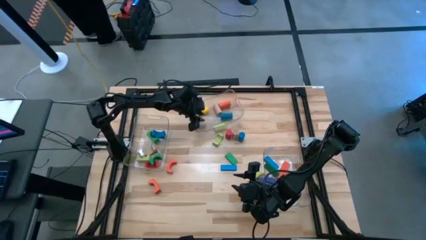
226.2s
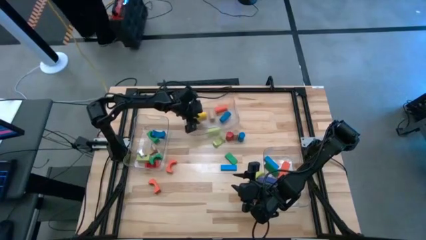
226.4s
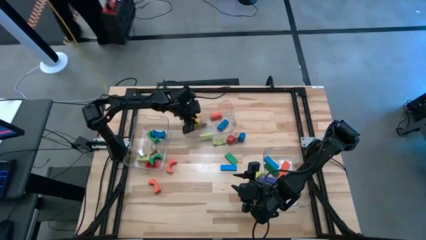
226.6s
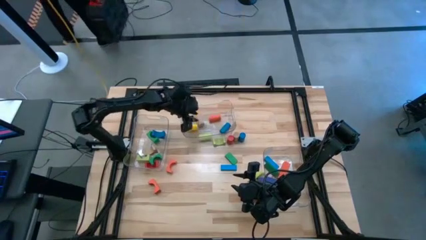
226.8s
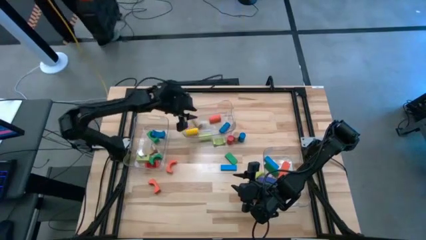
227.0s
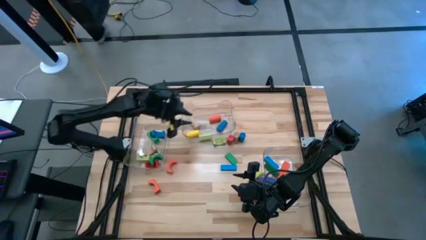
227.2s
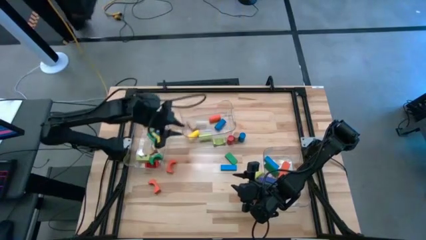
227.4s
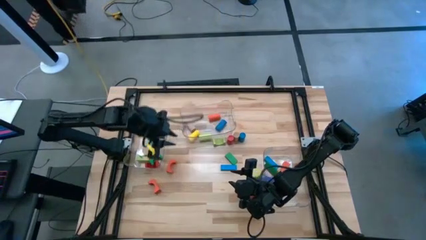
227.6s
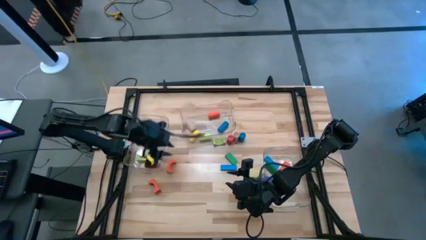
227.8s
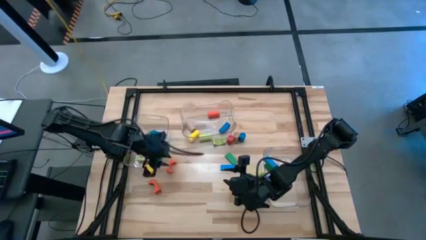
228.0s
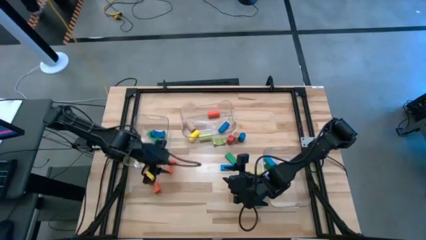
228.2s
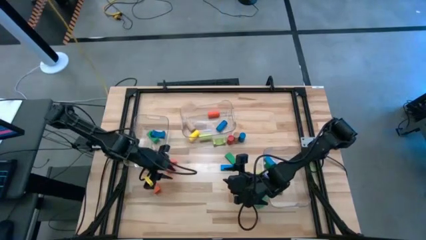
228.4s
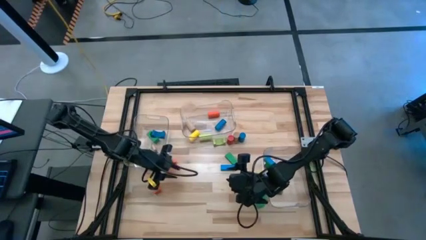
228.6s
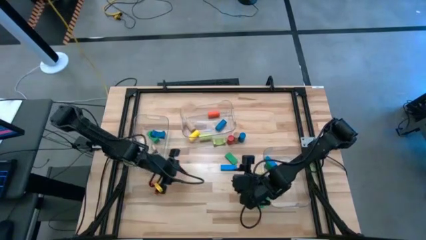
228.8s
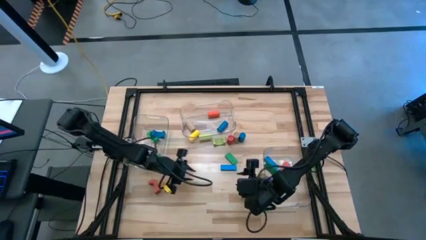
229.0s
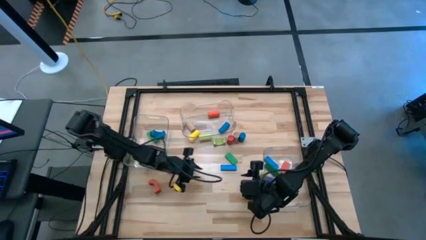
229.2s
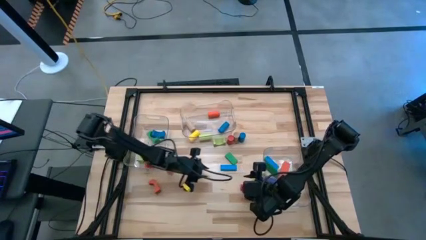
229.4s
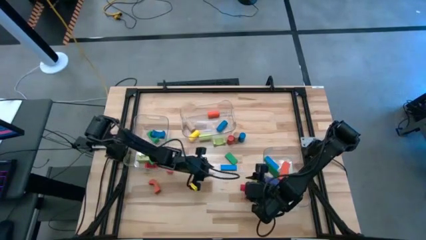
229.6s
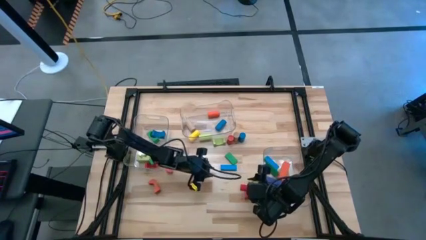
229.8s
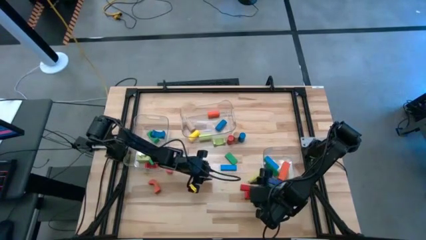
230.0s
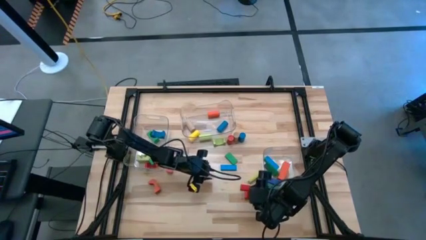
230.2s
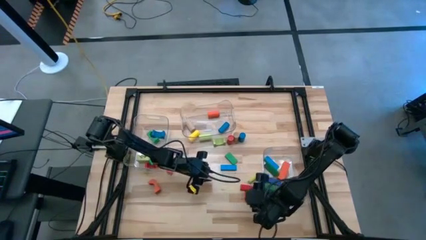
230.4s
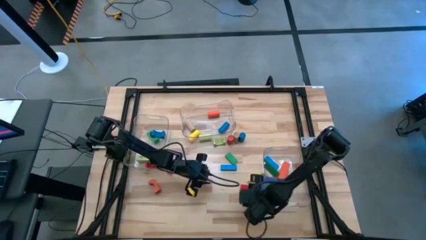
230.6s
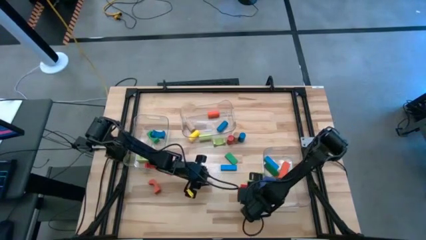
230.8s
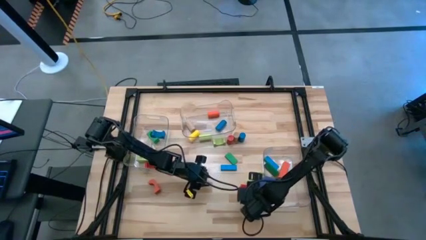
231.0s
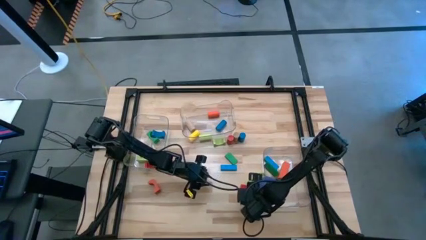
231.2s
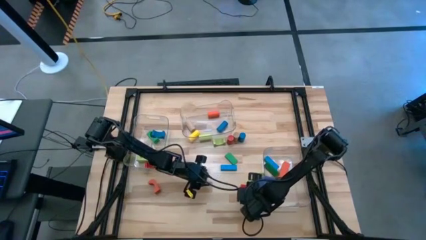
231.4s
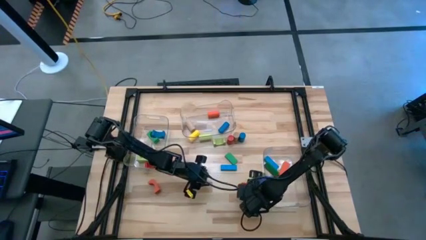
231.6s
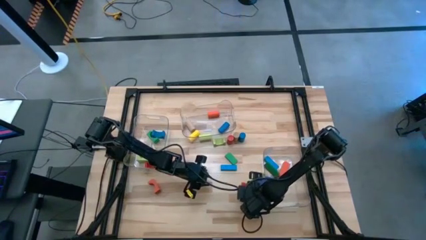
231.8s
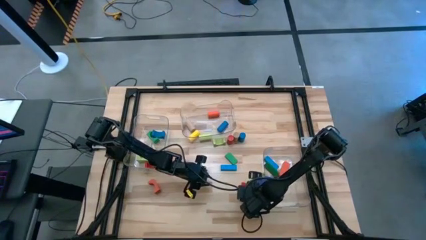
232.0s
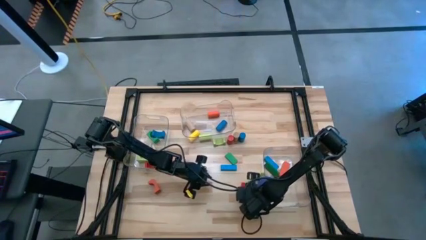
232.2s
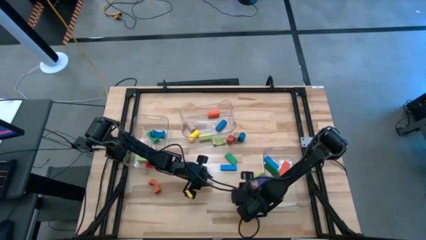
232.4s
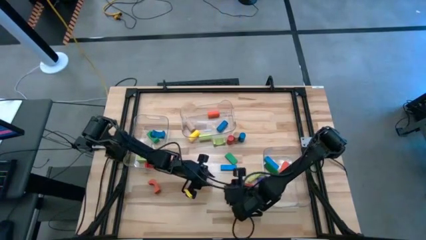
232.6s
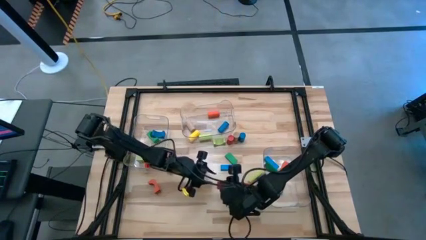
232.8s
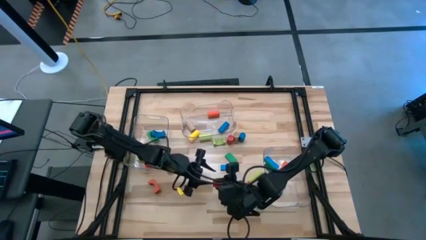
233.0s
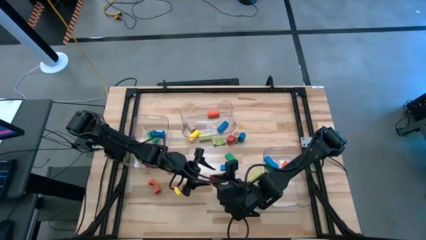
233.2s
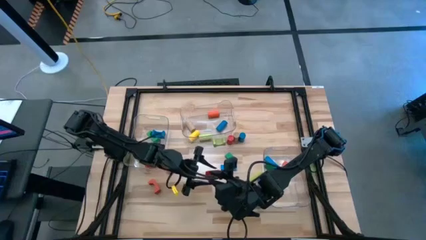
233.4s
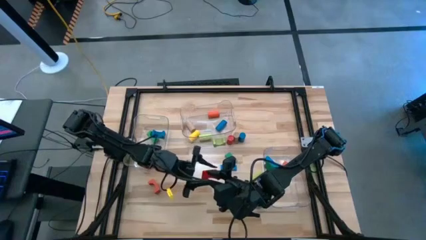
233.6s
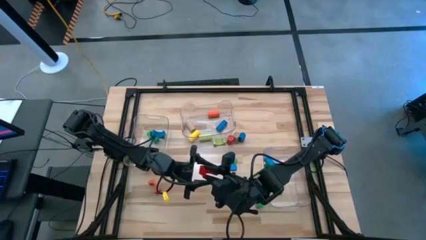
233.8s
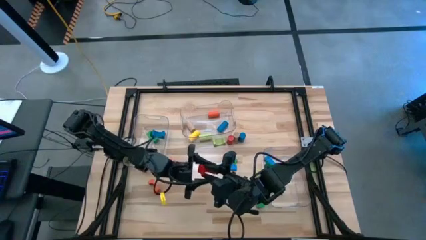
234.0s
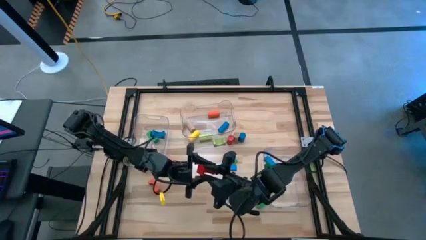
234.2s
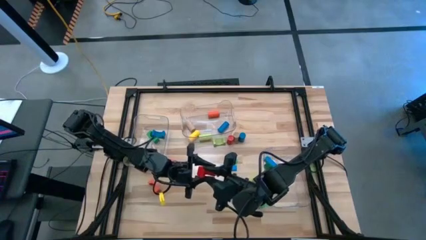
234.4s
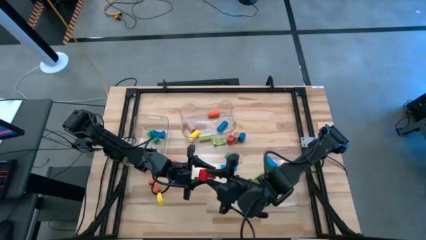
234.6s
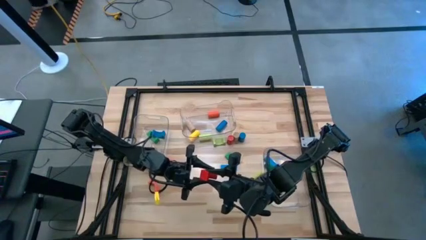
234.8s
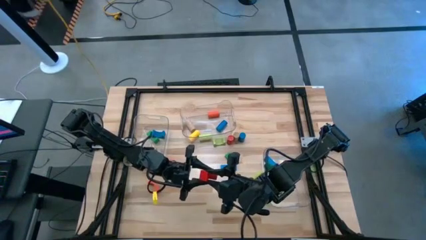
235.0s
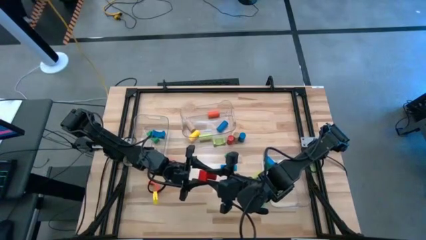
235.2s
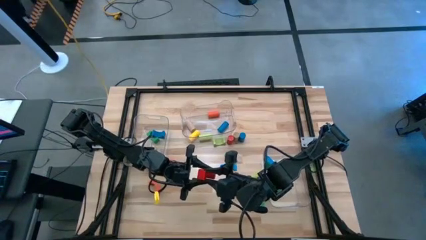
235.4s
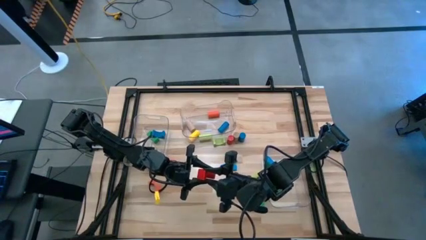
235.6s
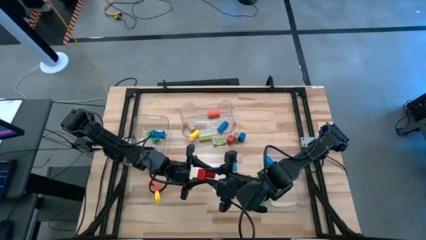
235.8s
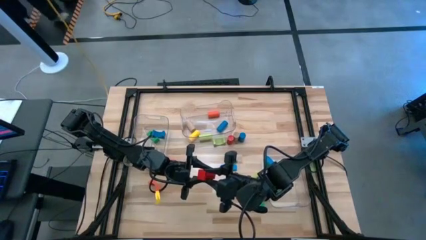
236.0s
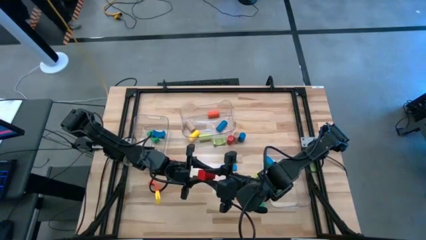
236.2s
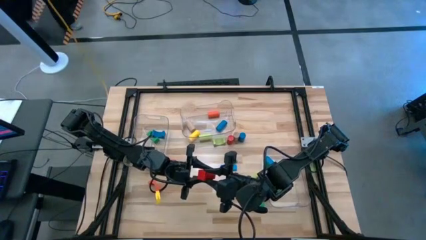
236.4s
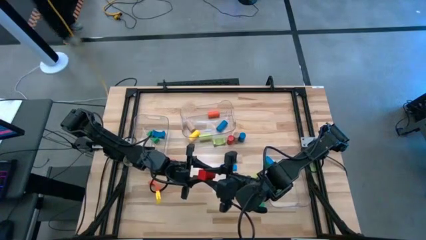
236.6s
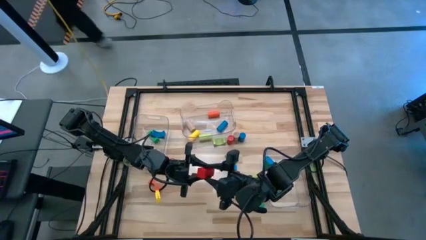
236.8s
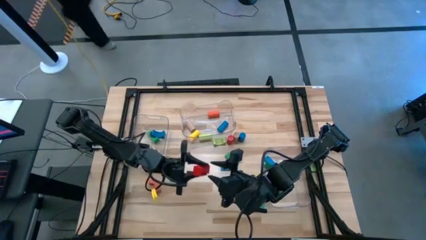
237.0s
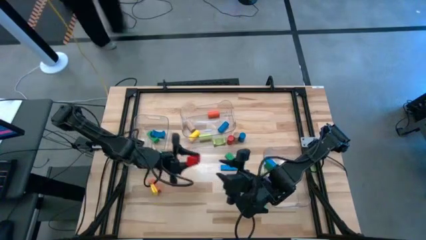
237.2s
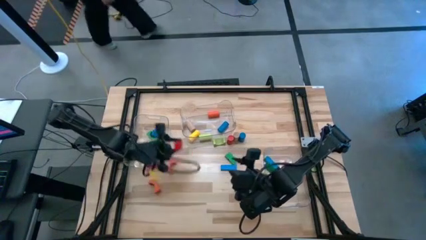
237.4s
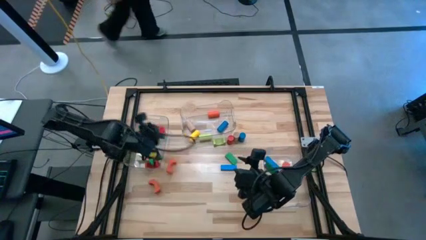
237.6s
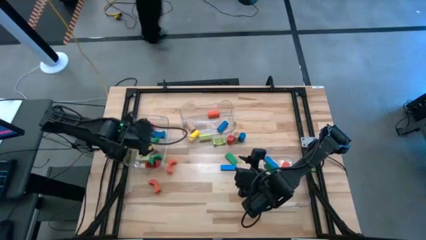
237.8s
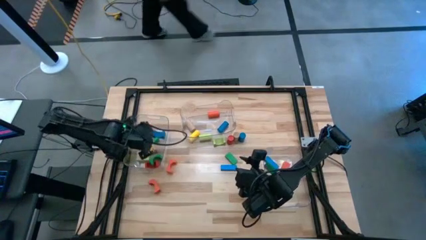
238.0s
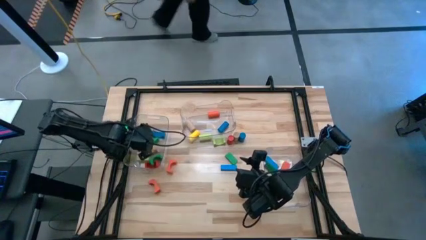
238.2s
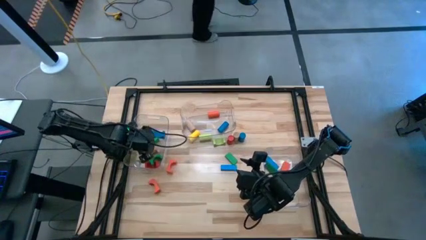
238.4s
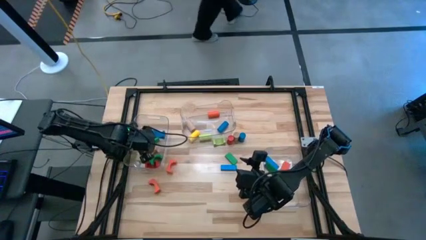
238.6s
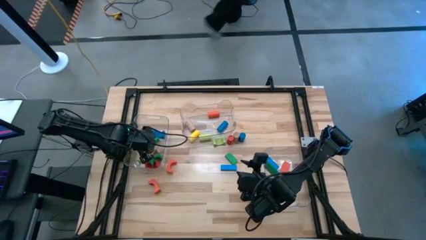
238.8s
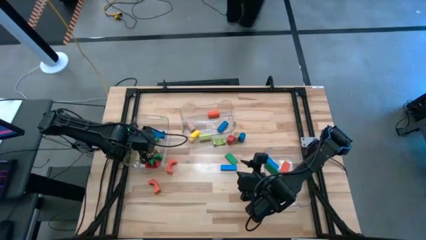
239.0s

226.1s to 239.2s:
Task: Sort blocks by size
Put the red arch block into the left transparent bin
